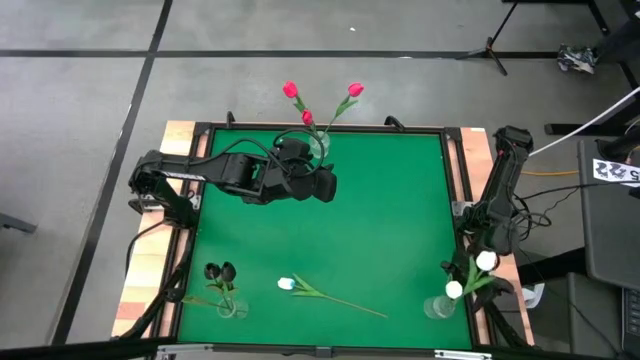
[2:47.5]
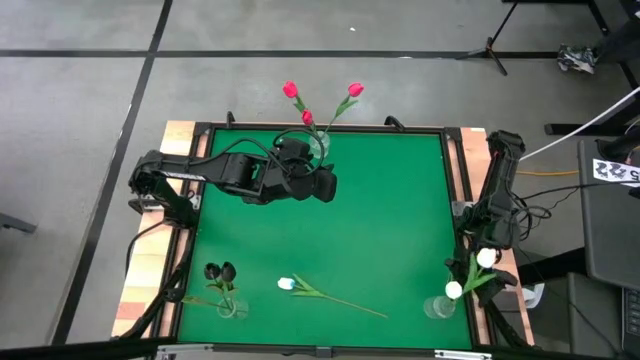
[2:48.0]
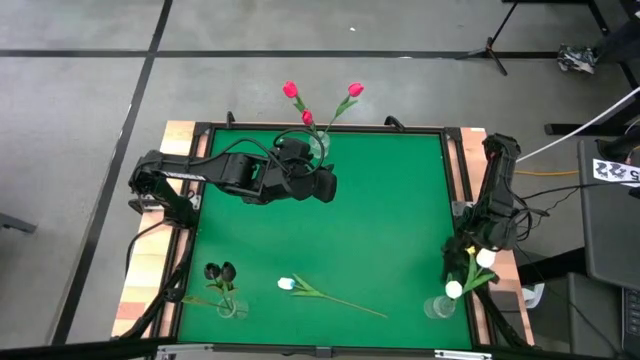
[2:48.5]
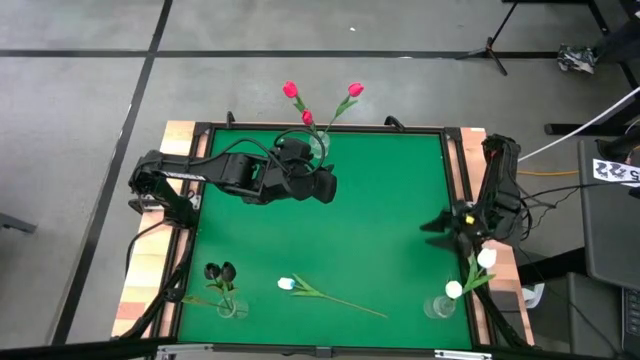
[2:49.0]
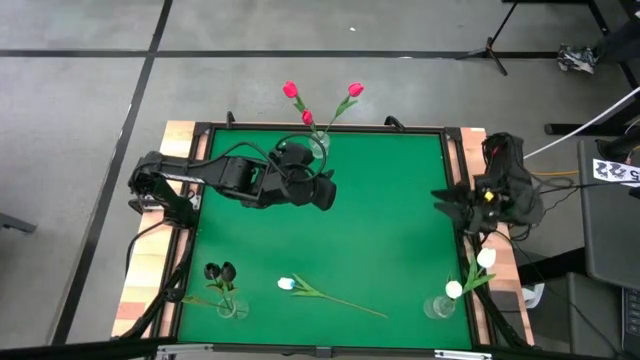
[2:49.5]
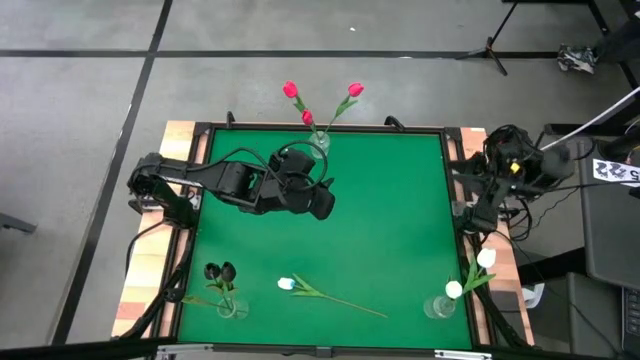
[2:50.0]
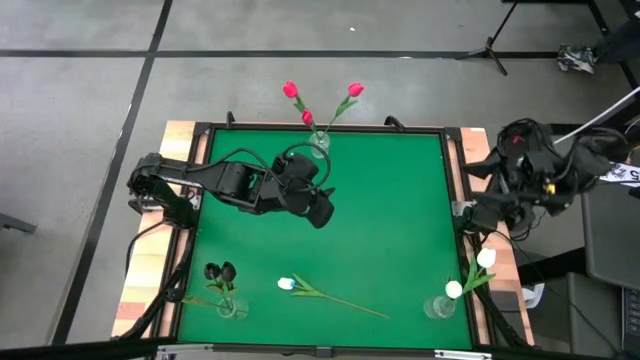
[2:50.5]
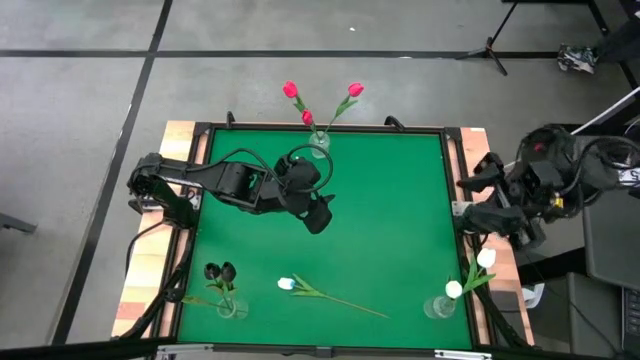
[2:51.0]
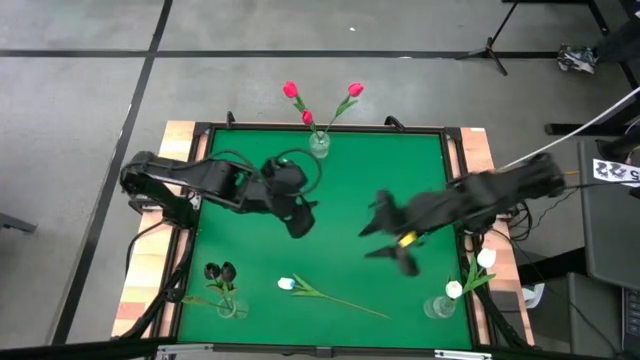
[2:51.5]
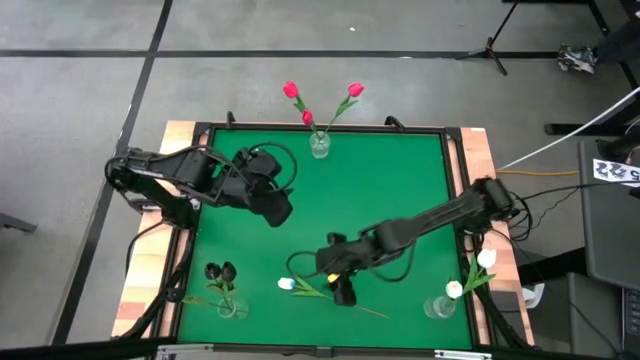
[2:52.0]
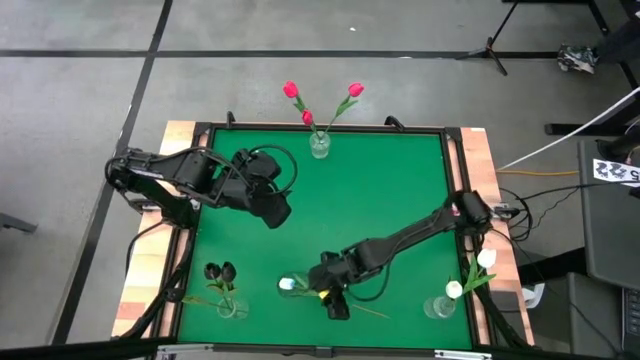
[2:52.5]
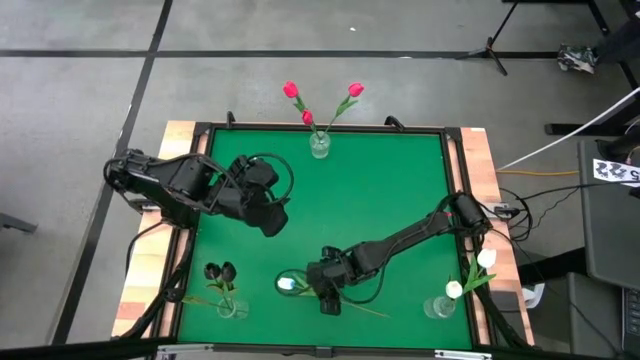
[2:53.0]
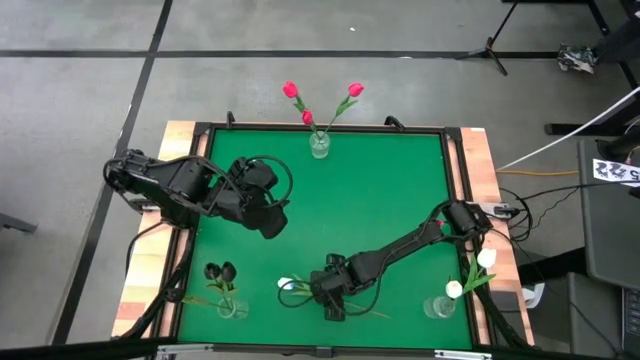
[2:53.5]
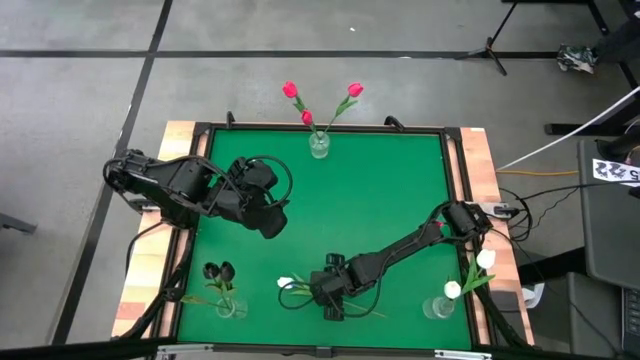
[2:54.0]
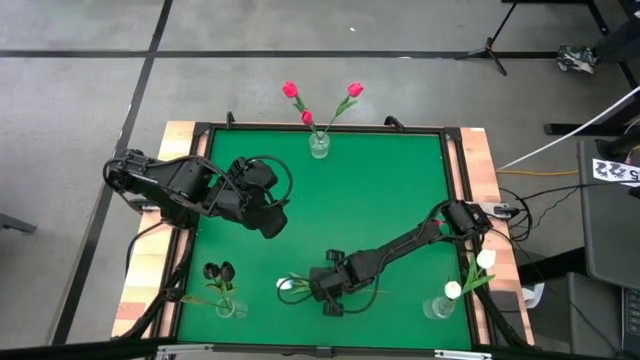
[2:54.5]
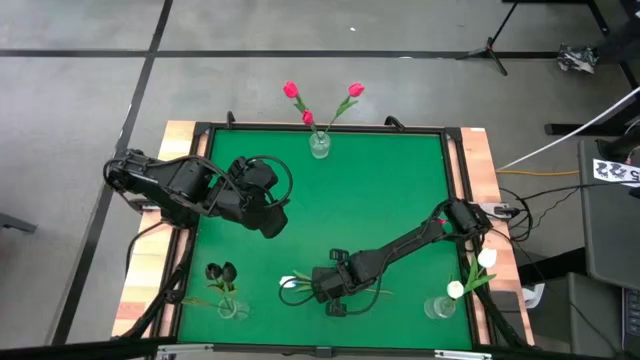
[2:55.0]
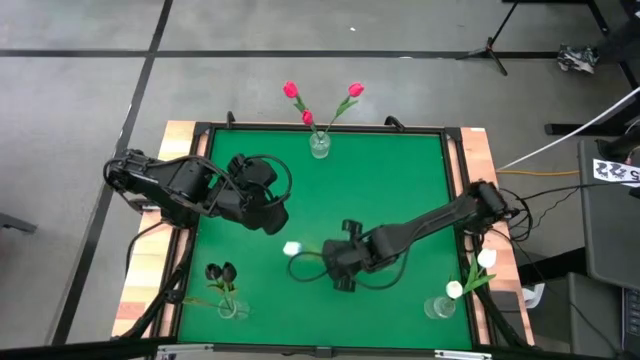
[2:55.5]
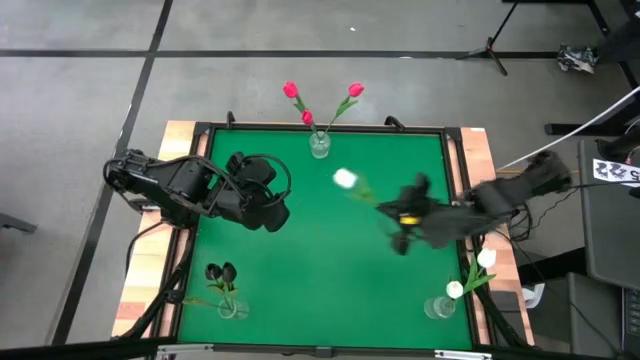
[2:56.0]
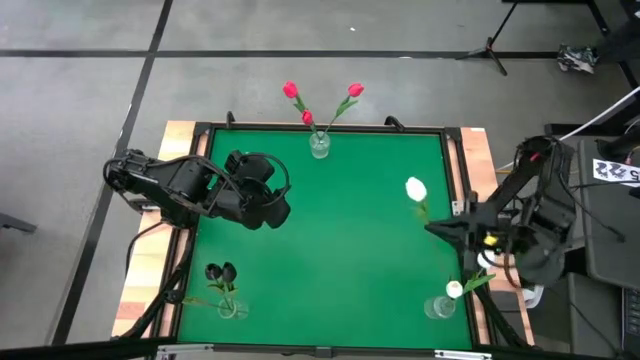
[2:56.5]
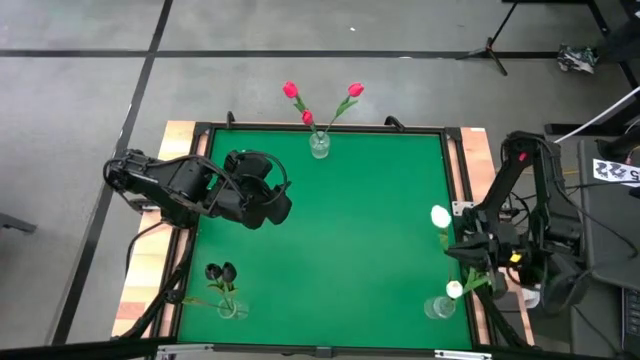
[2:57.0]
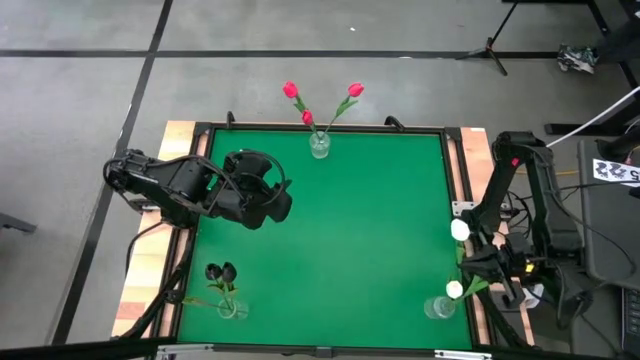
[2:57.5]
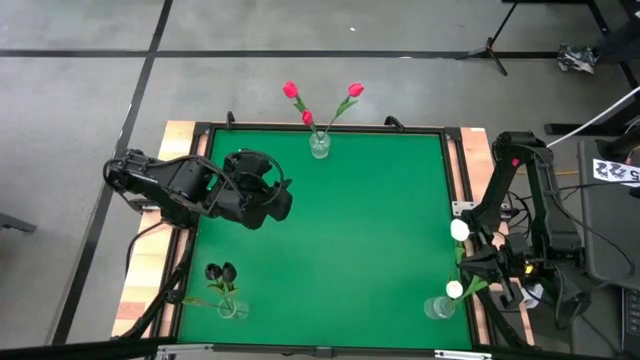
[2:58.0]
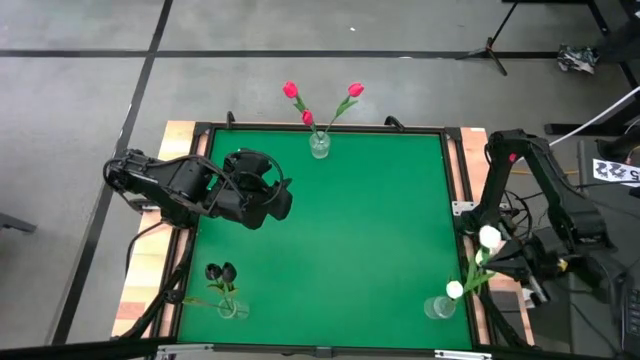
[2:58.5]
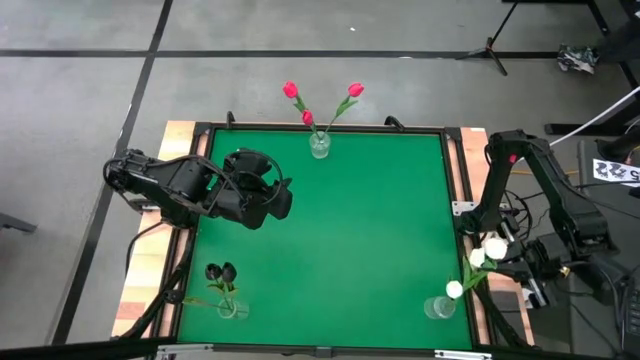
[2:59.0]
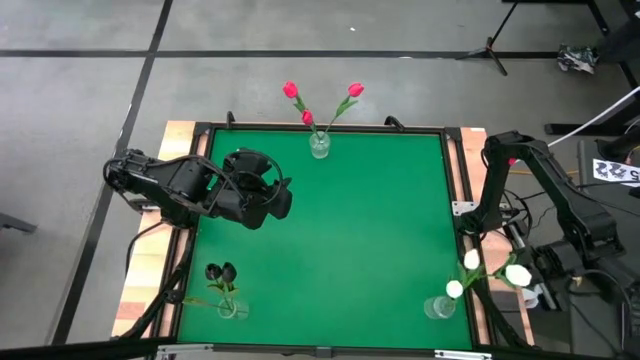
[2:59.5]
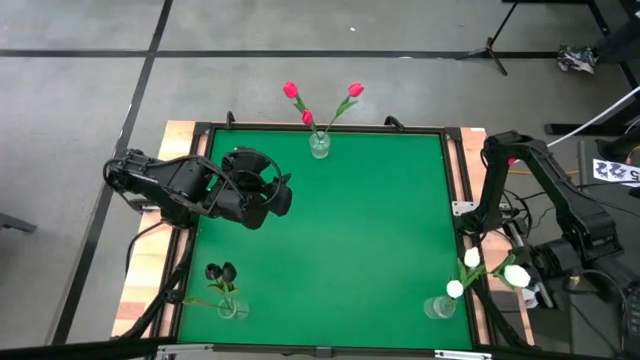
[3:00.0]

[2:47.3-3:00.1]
Task: Sort flowers into vase by color
Put the white flower into the bottom right transparent vase

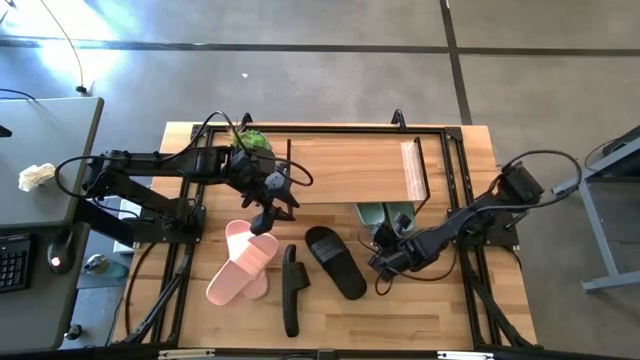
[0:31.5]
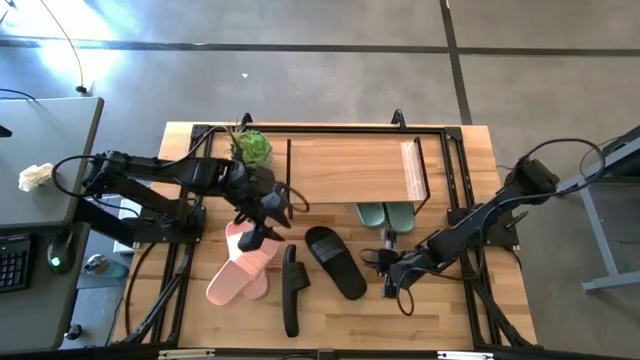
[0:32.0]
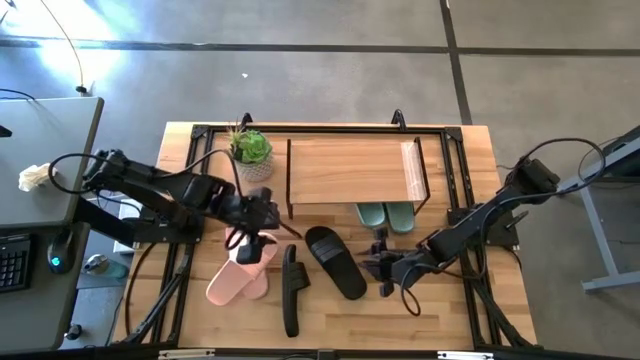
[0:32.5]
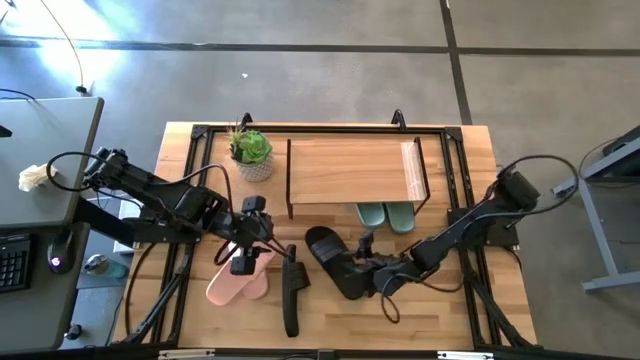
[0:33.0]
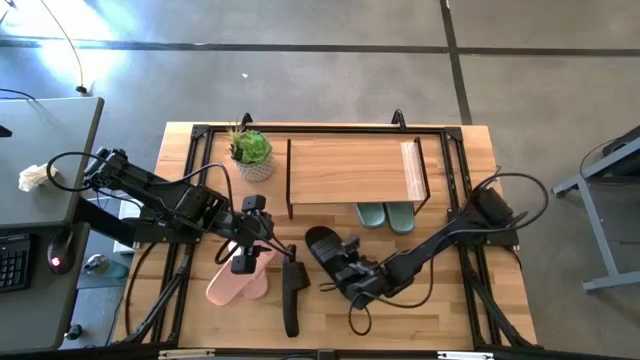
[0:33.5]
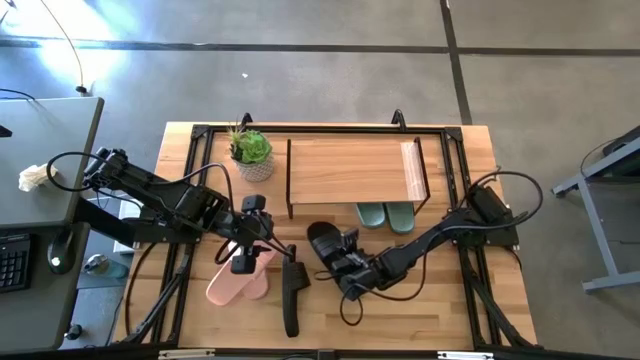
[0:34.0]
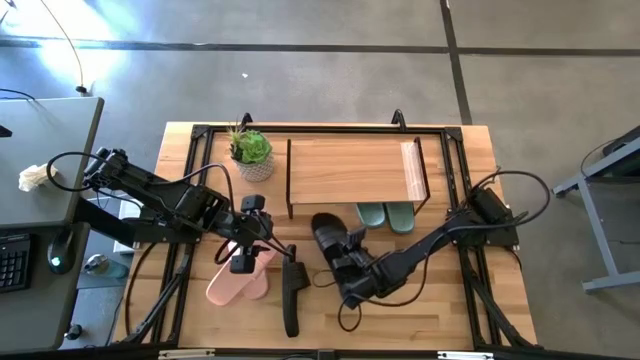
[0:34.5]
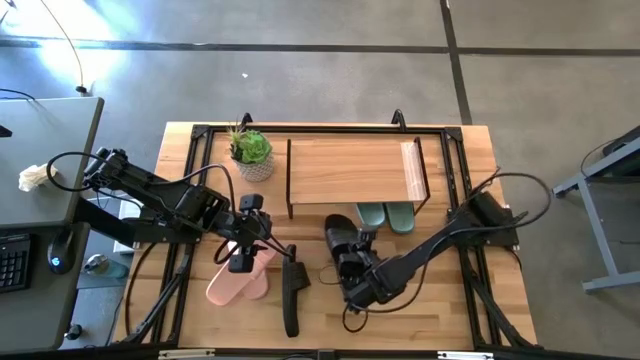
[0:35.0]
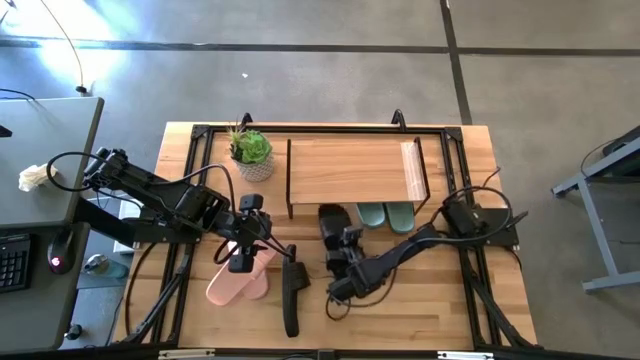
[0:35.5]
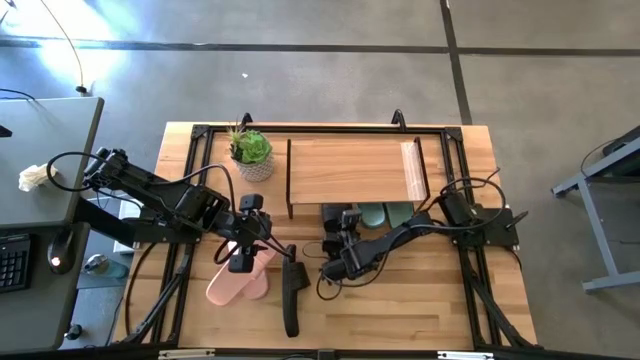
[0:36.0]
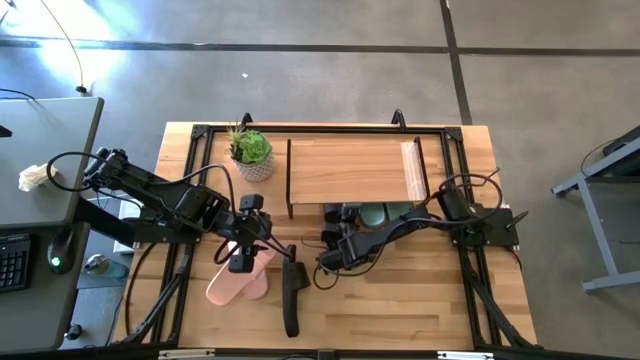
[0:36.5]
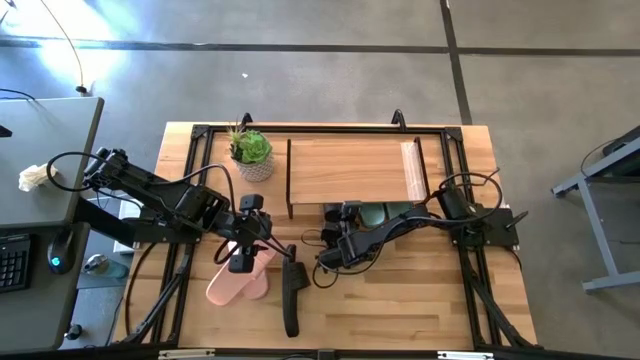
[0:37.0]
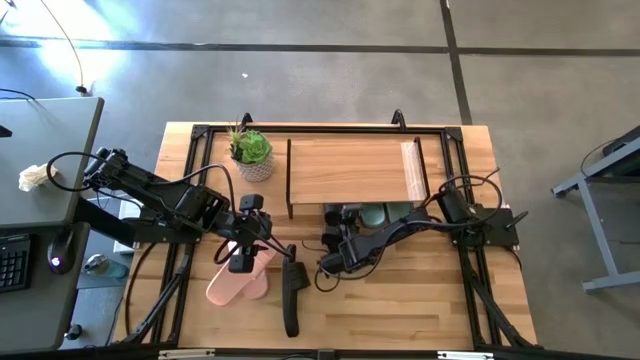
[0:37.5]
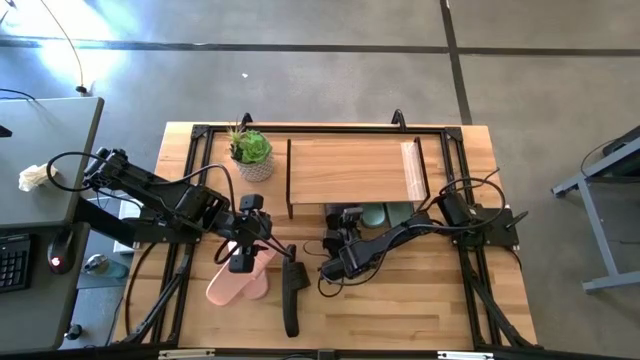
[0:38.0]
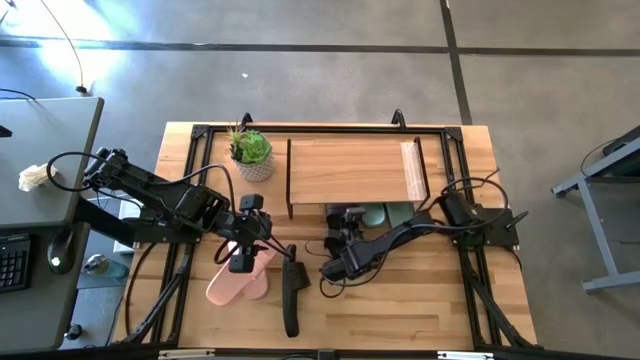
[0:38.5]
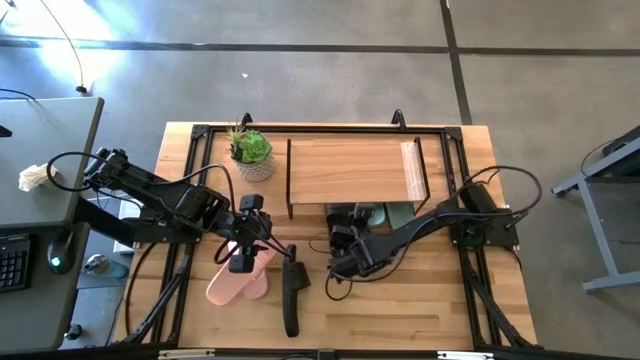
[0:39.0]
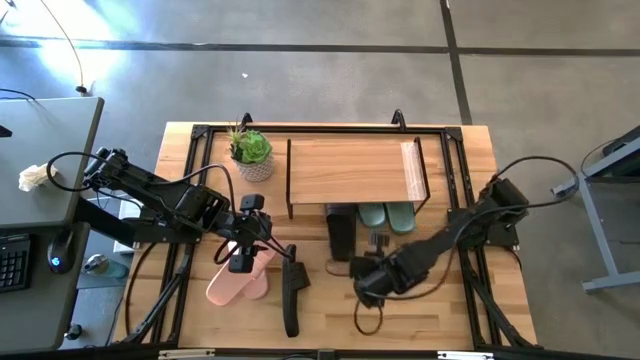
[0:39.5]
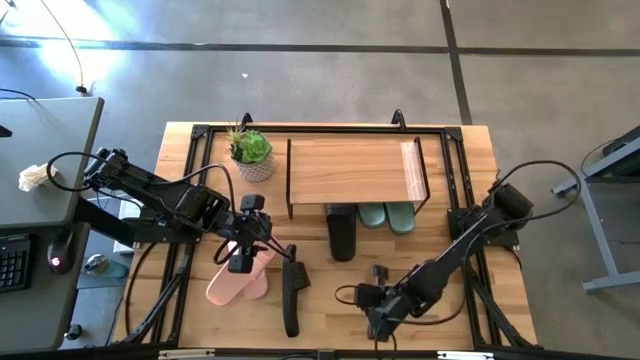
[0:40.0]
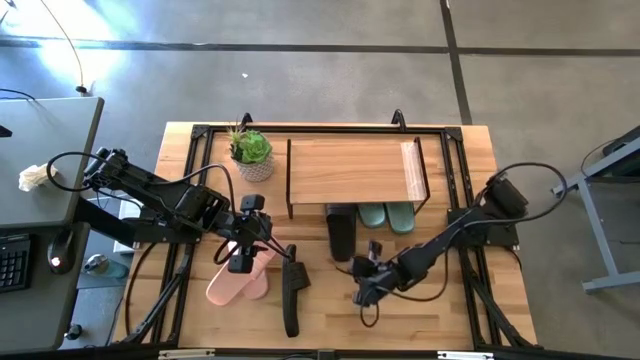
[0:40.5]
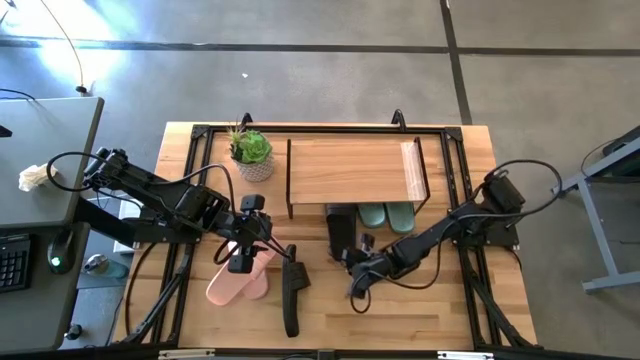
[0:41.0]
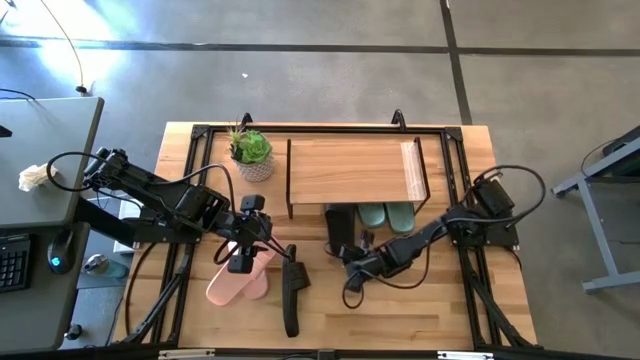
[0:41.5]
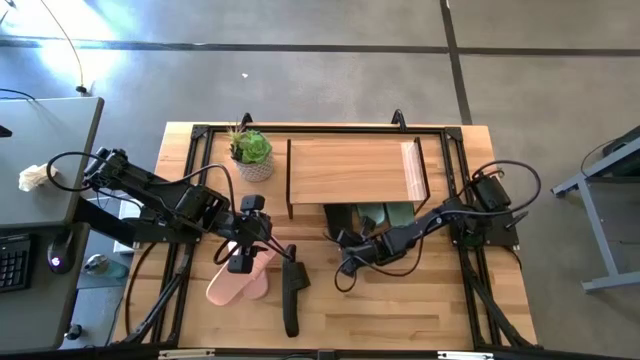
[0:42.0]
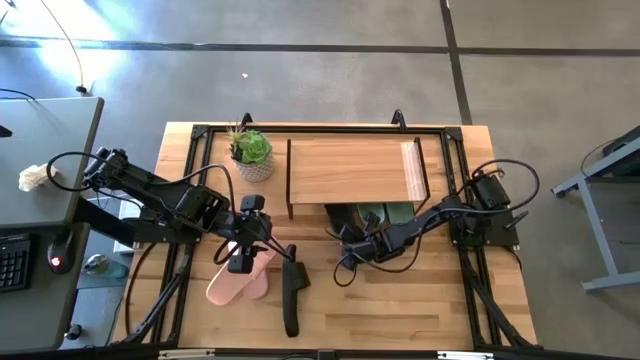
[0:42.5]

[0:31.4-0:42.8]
Task: Pick and place slides into the shelf
Put the right black slipper under the shelf
